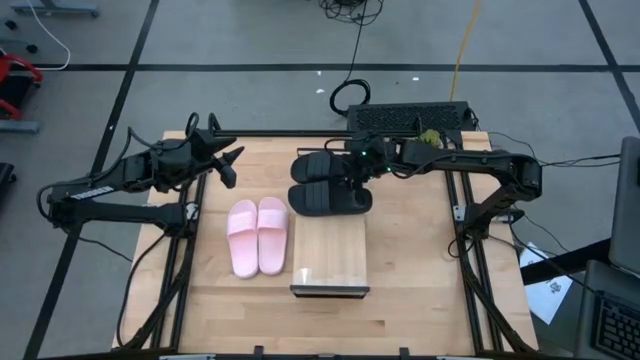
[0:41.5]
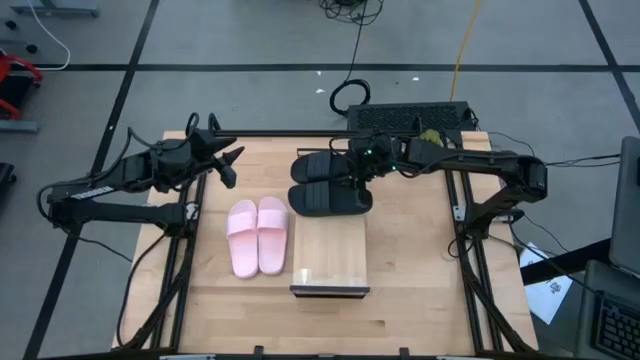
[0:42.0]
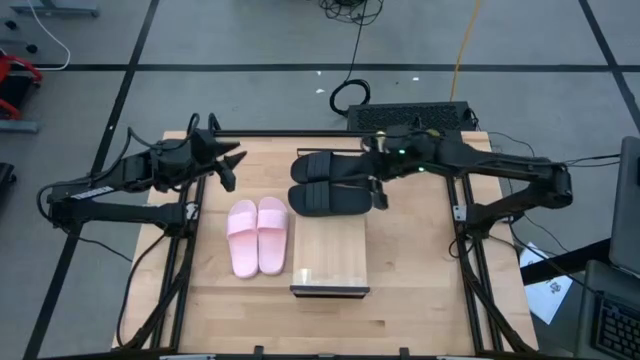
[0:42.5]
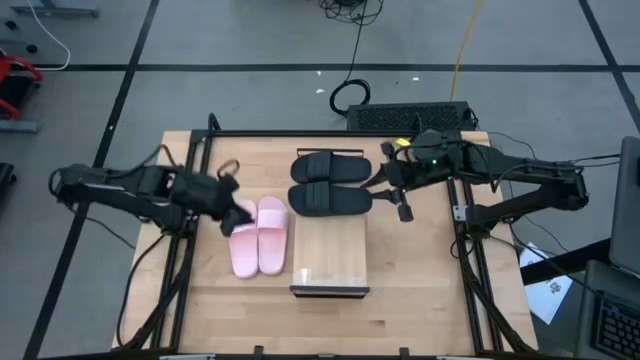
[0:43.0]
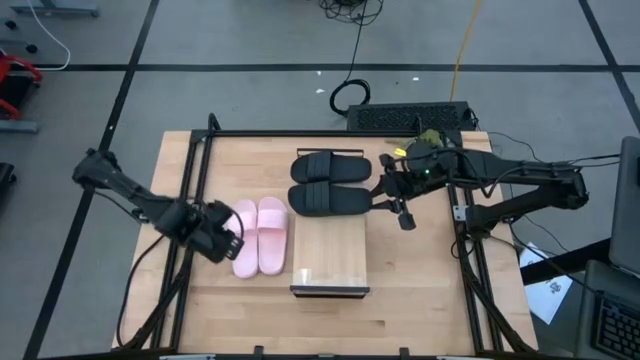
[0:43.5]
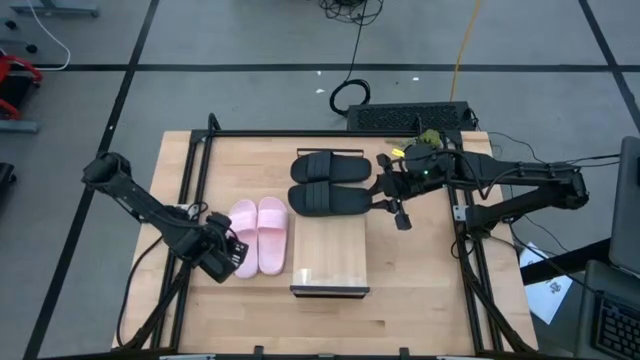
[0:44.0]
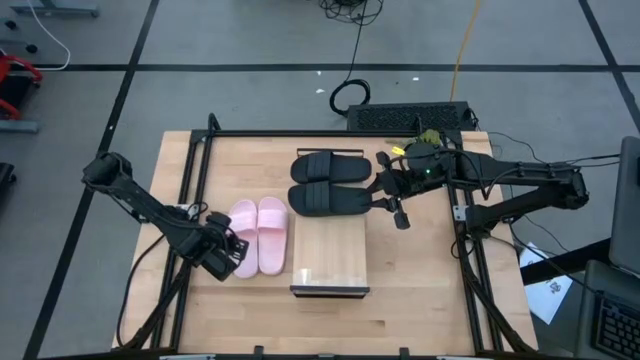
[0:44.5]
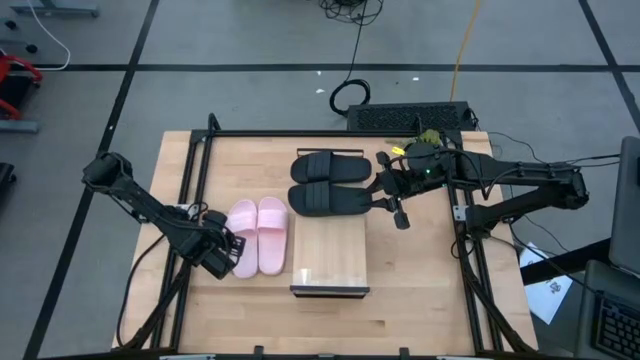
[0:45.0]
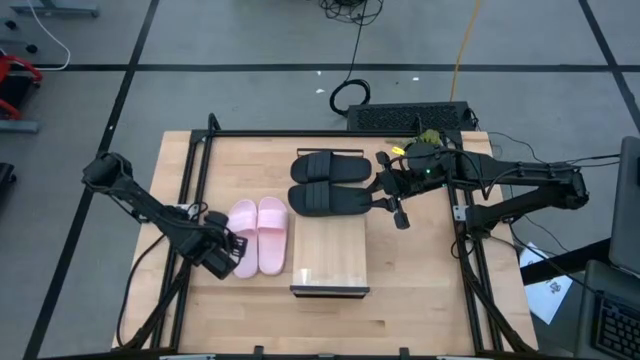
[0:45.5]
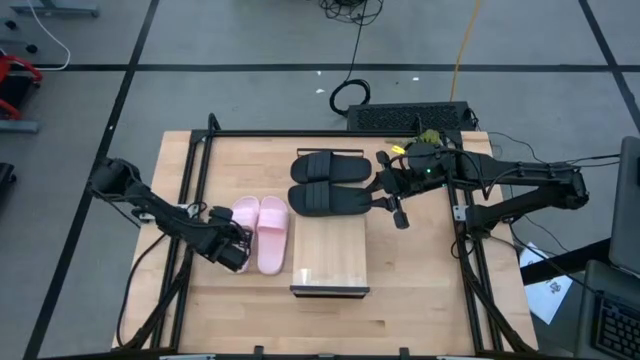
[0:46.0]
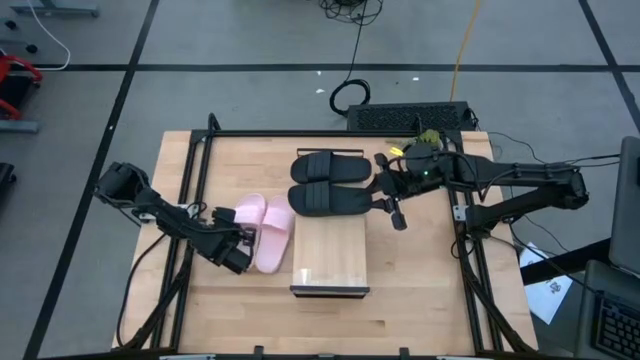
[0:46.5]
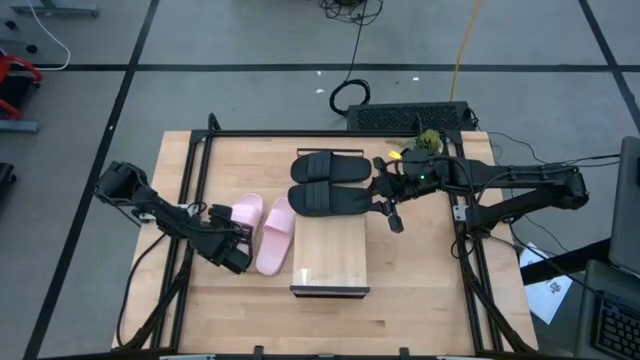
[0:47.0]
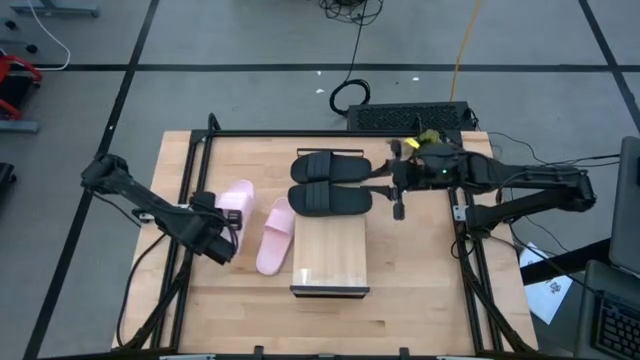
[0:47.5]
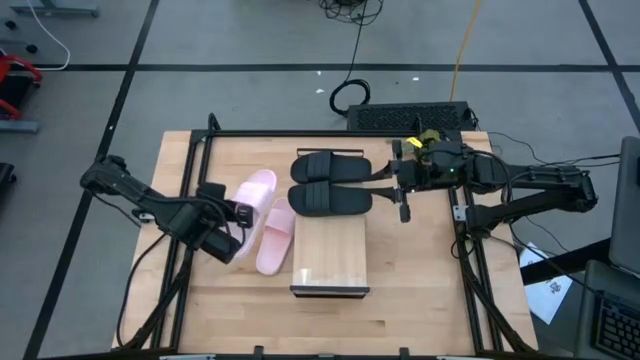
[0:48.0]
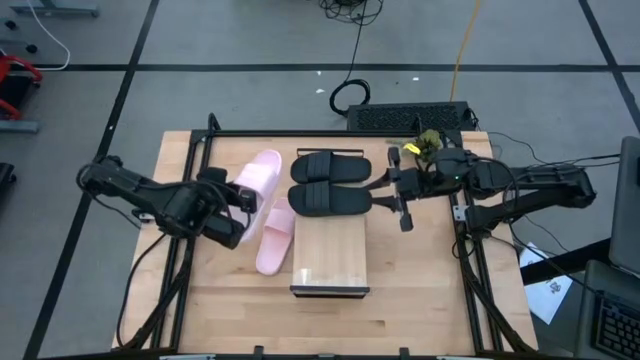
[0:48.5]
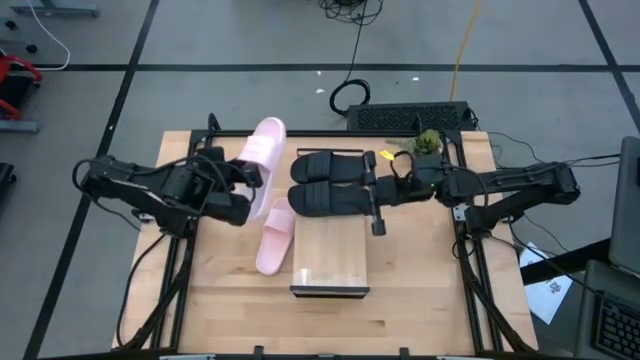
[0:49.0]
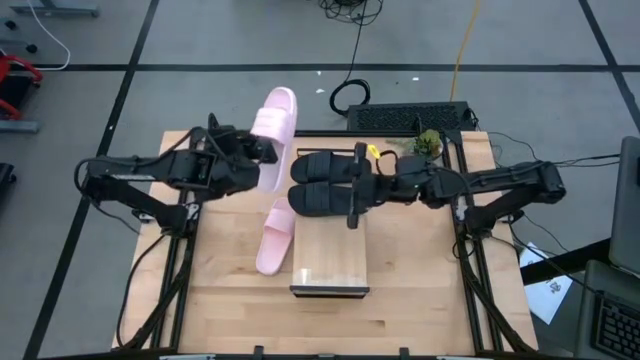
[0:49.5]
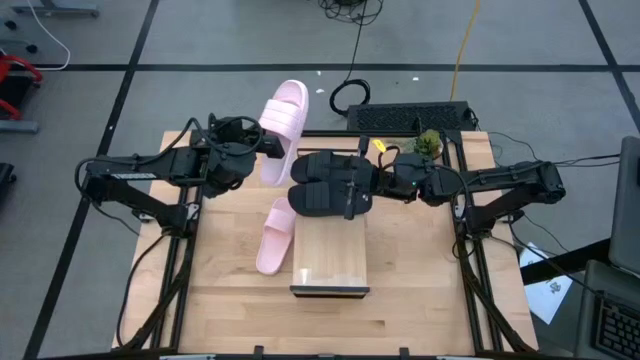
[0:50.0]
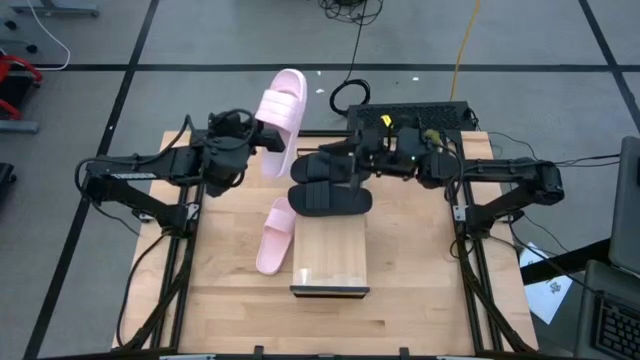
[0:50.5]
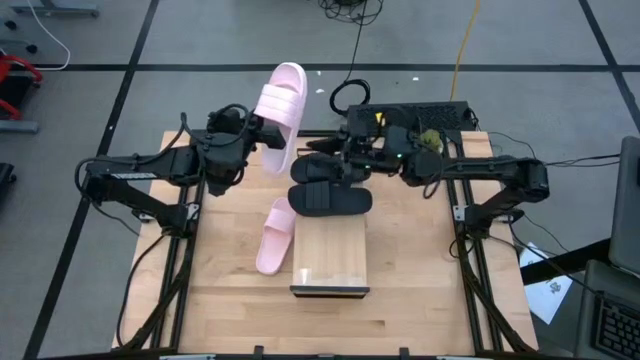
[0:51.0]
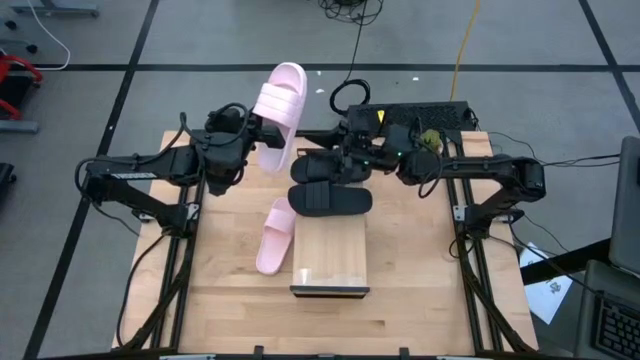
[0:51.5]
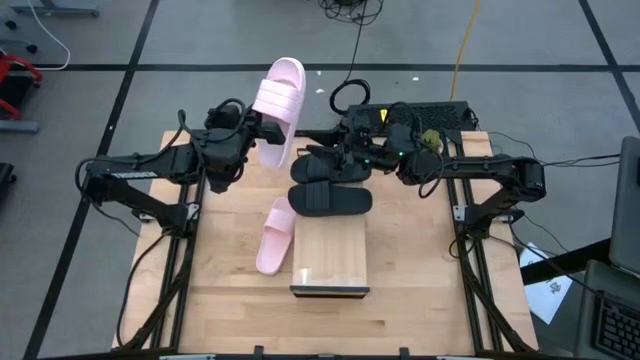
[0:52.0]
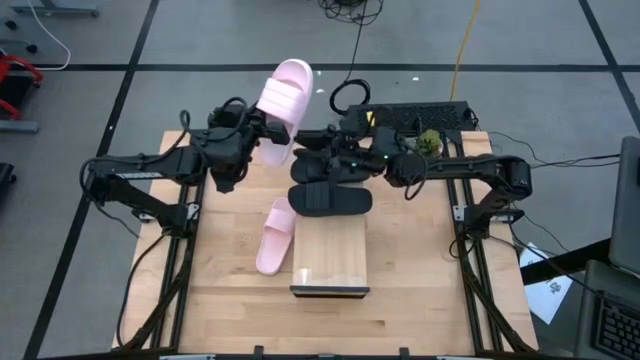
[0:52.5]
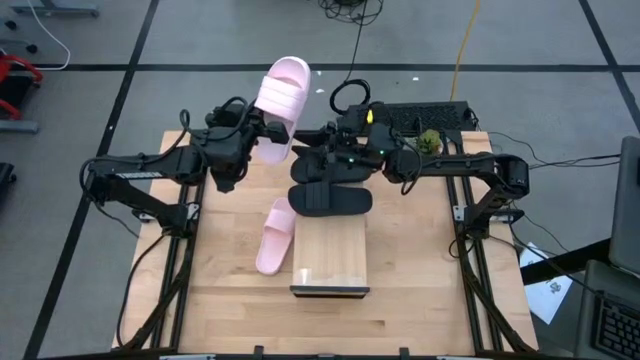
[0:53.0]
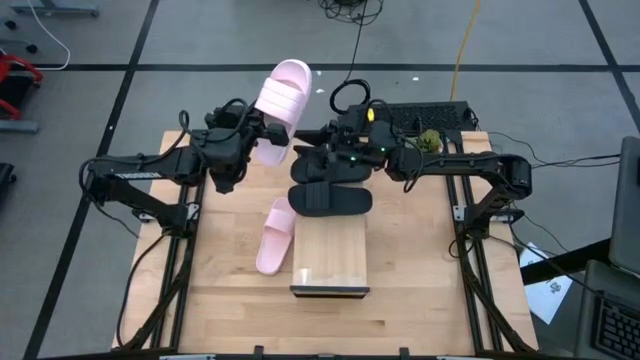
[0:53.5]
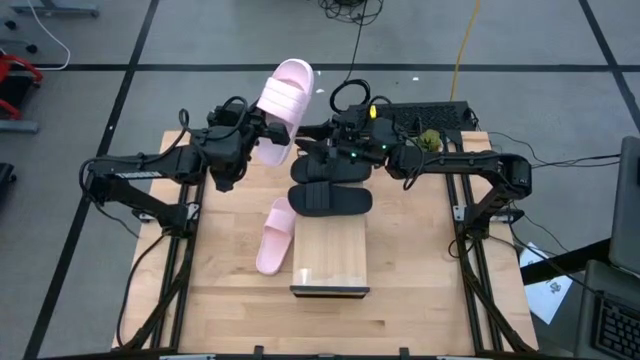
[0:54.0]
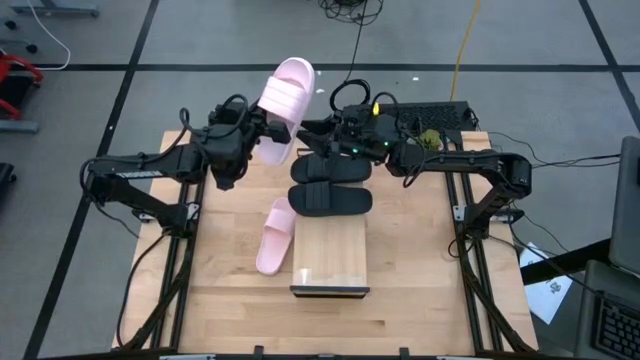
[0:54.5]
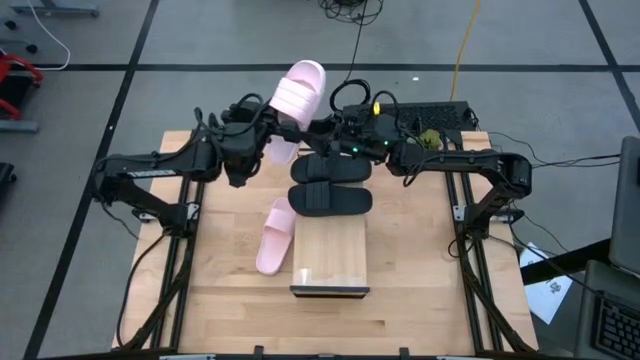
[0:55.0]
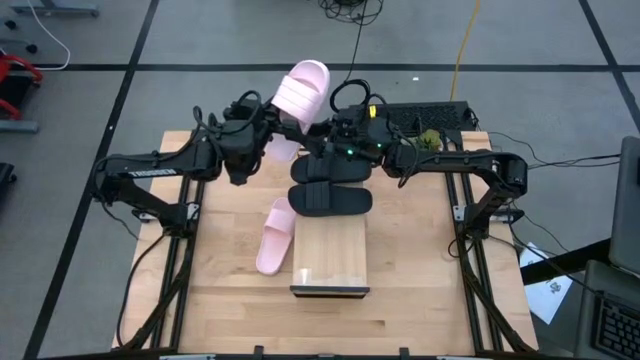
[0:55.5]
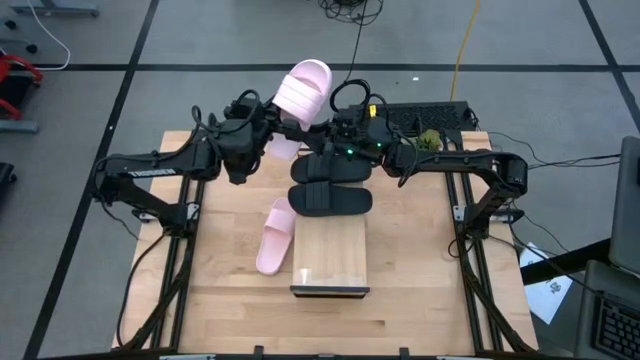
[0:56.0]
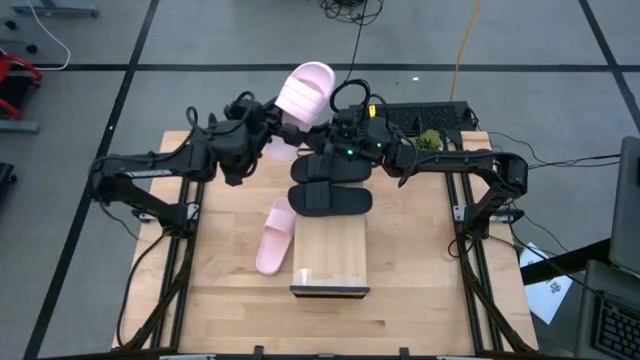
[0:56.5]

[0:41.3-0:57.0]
Task: Pick and place slides into the shelf
Put the left pink slide on the shelf
